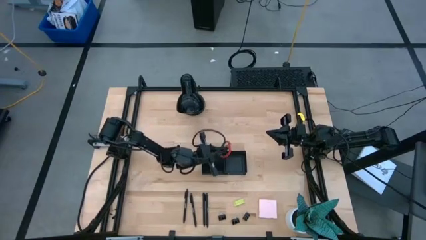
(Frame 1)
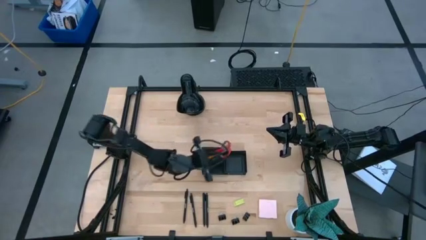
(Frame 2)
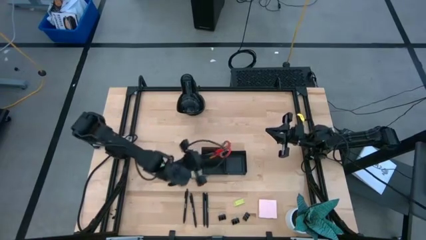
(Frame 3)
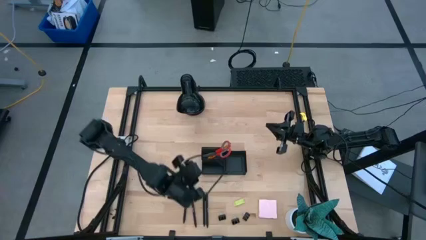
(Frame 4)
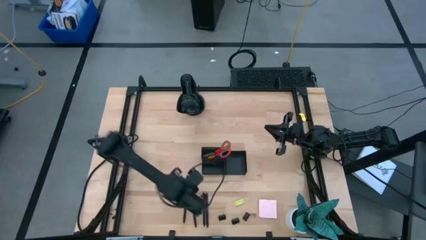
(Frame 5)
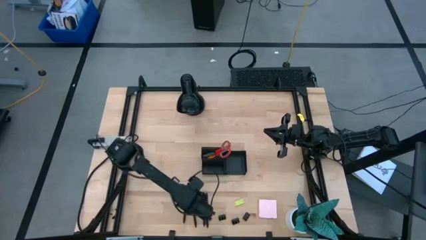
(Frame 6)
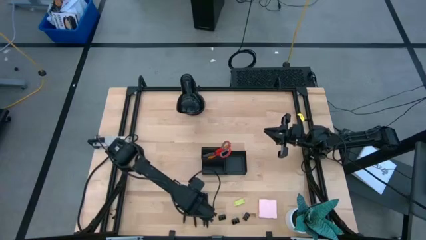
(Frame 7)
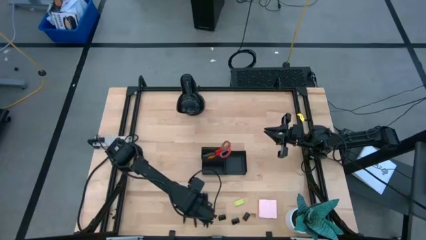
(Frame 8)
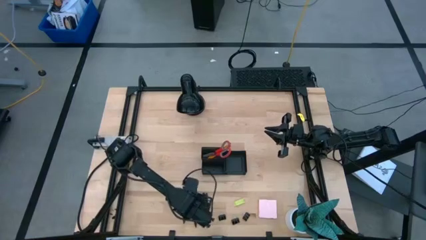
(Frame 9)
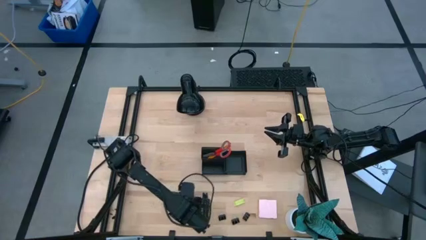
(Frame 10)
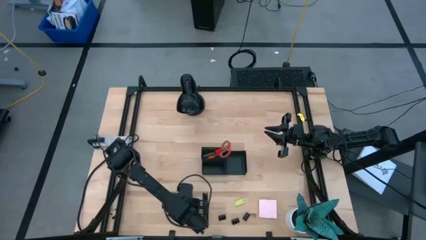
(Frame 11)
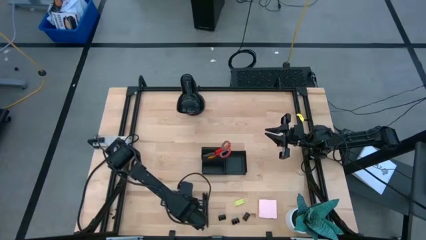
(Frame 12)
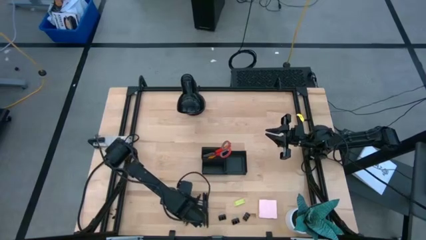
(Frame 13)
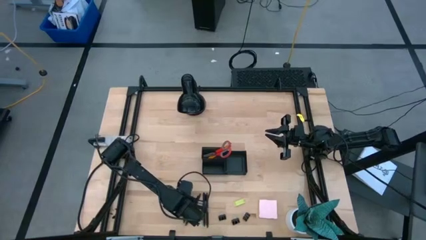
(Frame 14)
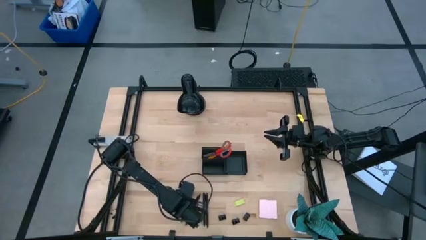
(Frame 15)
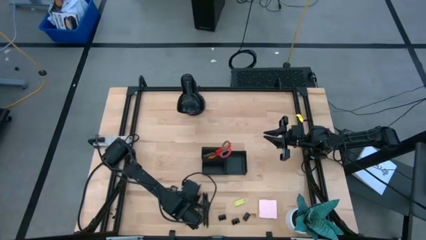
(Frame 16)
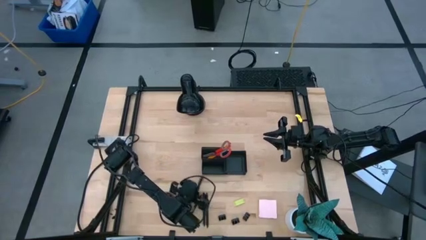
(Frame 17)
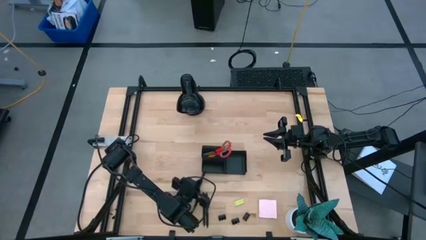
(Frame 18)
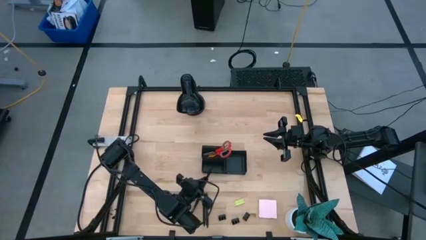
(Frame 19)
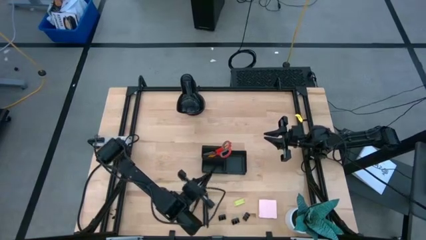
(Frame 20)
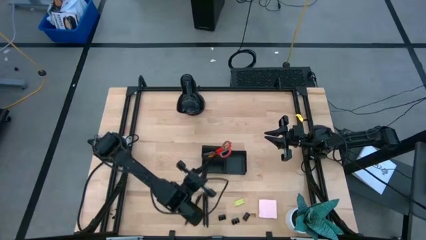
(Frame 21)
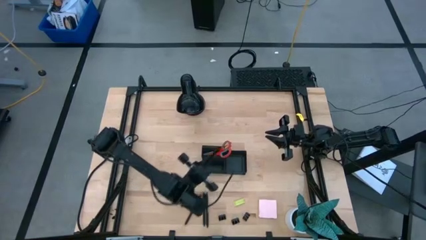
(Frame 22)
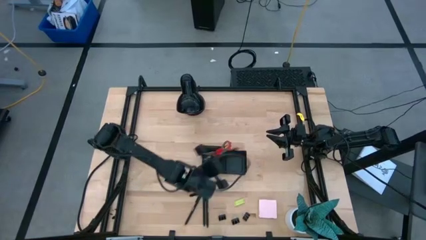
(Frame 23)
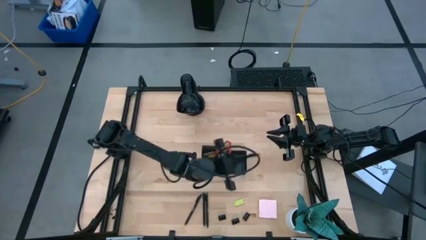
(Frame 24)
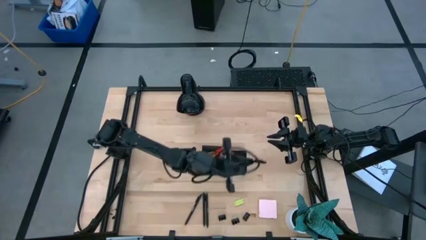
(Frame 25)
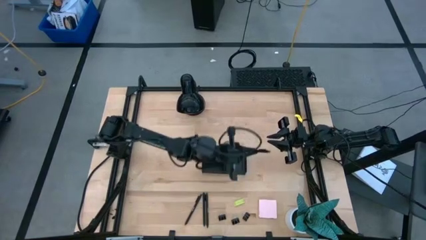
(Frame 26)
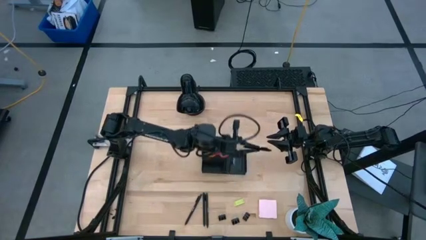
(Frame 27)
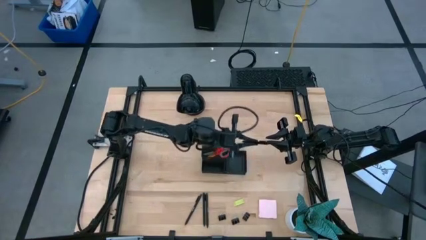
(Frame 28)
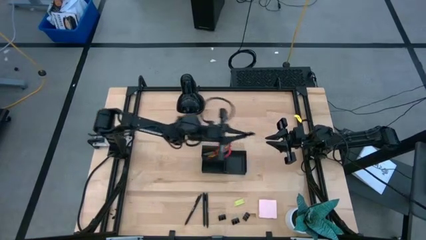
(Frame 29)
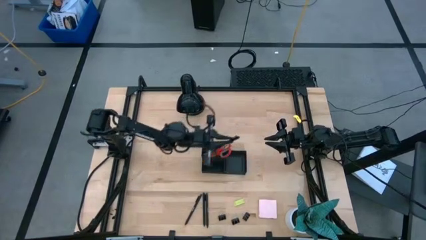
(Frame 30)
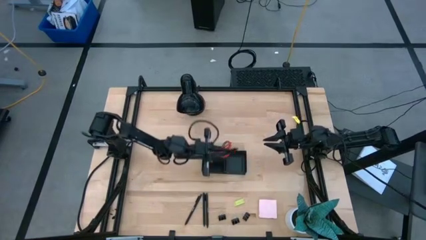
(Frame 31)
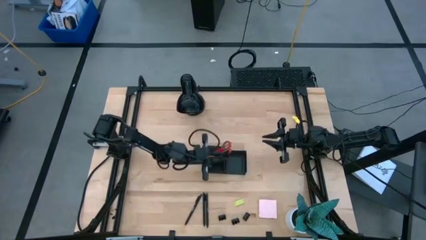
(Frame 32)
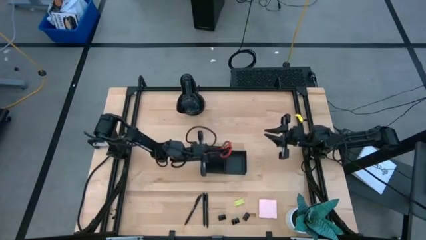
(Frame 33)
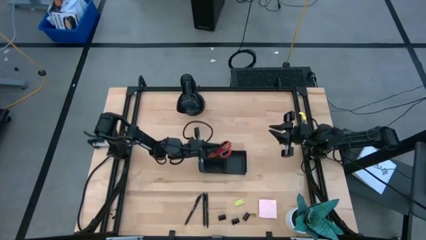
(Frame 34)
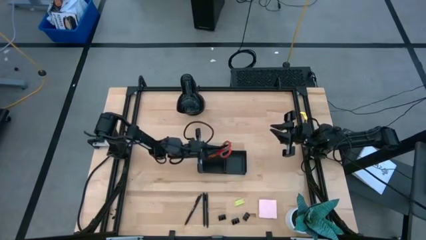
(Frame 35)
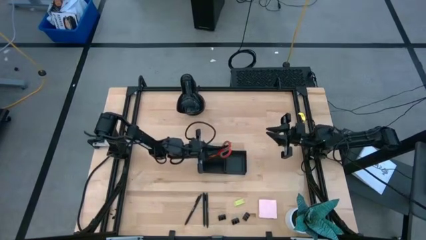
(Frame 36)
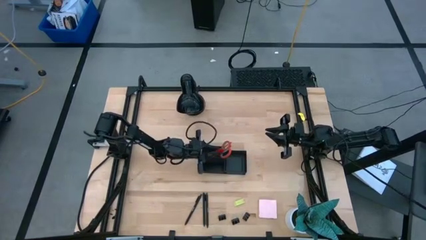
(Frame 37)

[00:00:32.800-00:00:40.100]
Task: Pick and place office supplies into organizer
Put the pen into the desk organizer

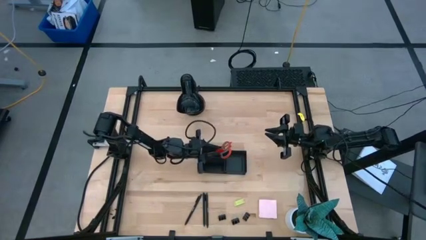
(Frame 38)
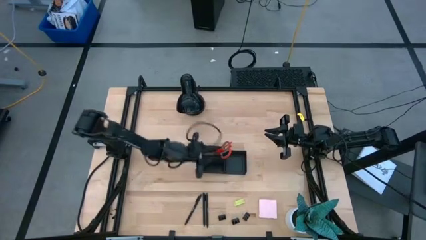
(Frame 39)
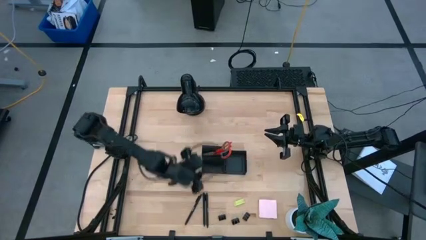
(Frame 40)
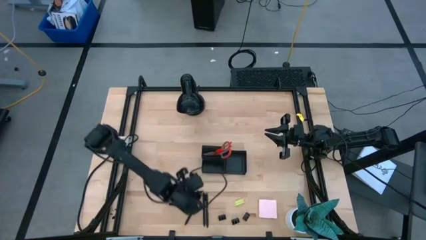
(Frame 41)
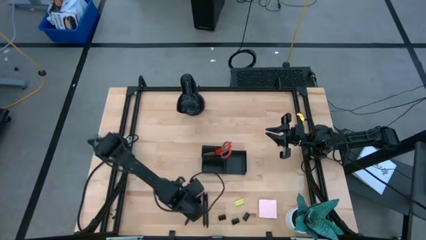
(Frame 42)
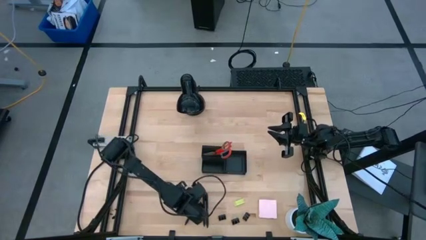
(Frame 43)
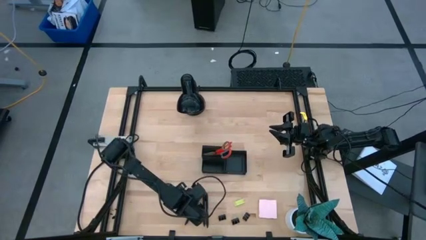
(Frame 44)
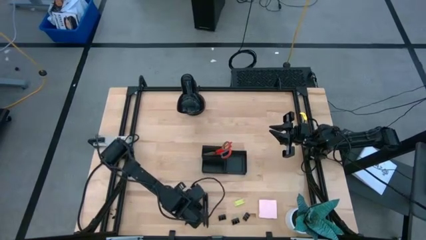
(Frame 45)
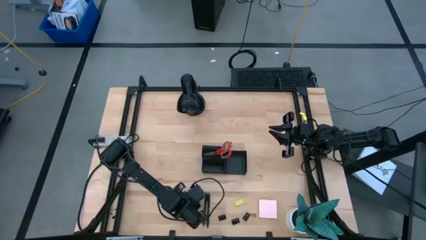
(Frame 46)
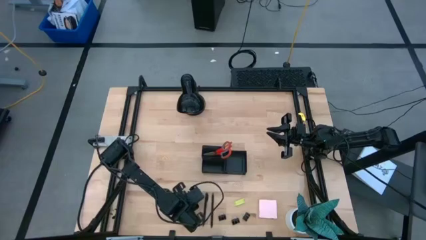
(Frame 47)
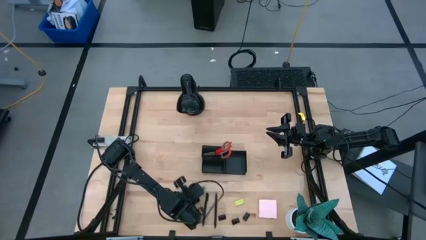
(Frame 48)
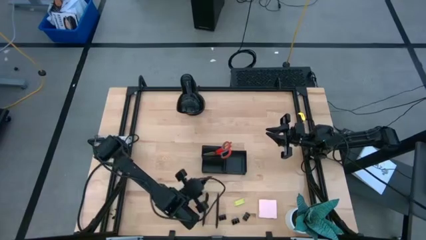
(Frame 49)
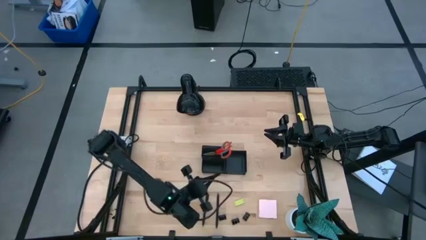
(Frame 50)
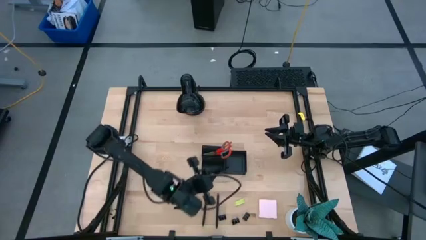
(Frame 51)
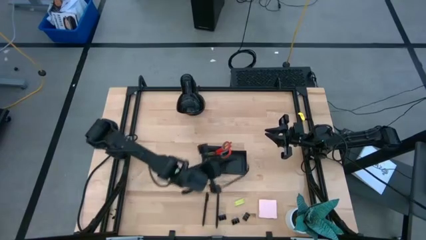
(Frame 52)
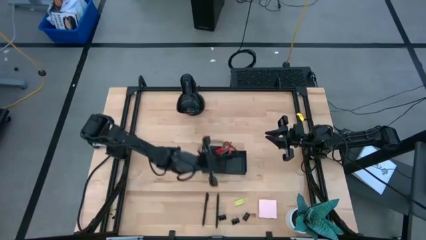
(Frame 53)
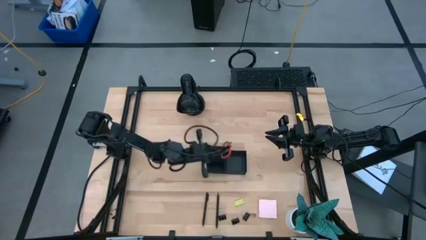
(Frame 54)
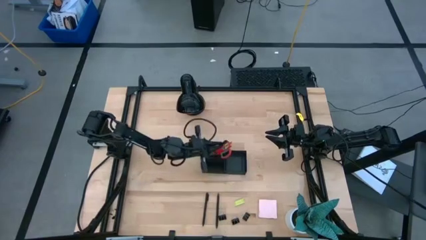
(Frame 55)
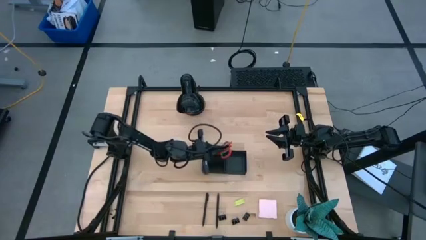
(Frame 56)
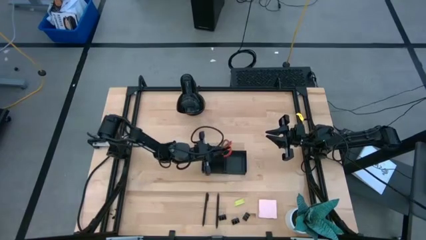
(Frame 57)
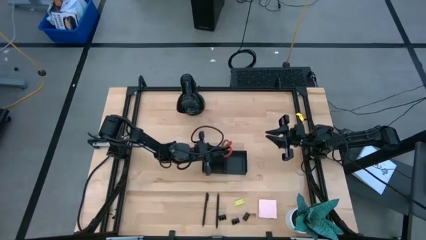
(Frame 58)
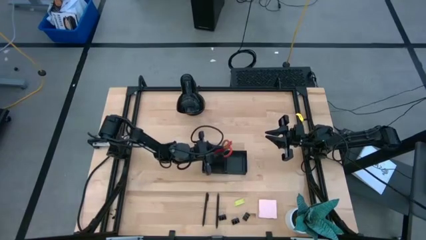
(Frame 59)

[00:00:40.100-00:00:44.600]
Put the left pen into the desk organizer

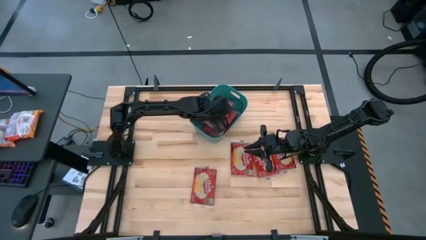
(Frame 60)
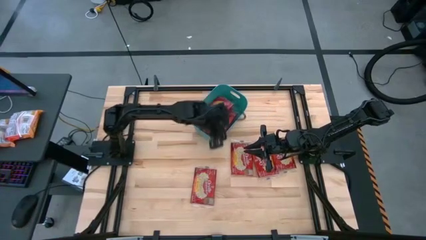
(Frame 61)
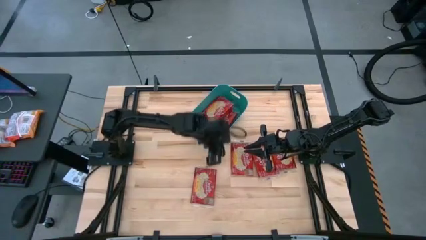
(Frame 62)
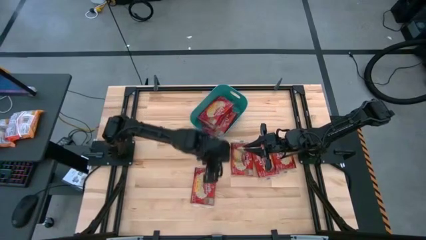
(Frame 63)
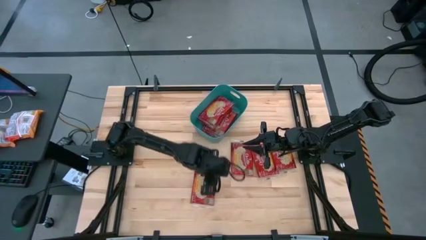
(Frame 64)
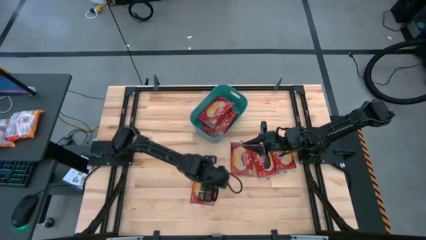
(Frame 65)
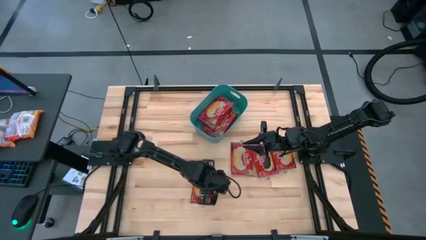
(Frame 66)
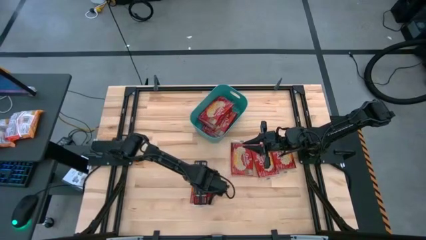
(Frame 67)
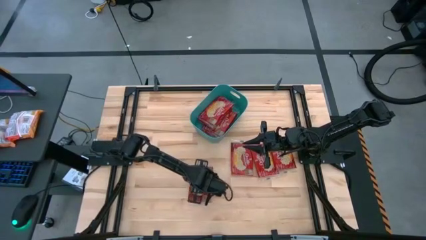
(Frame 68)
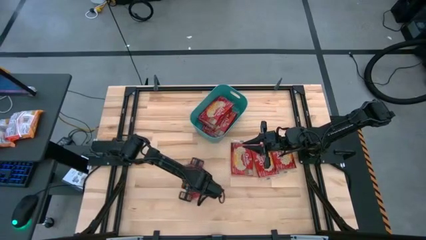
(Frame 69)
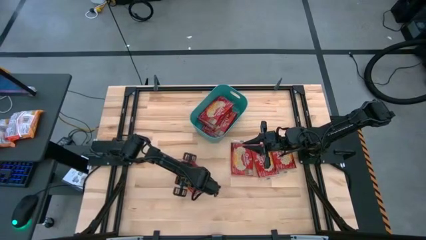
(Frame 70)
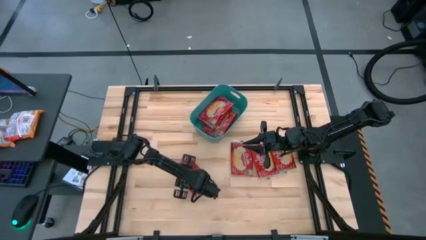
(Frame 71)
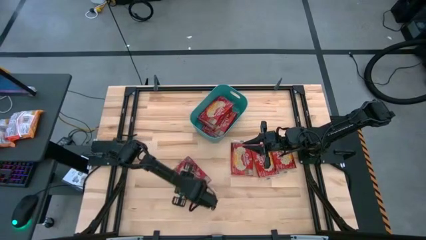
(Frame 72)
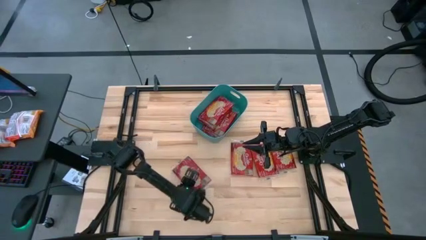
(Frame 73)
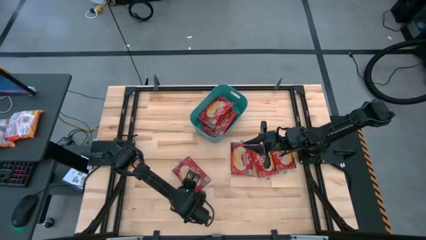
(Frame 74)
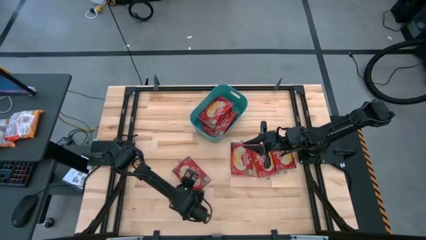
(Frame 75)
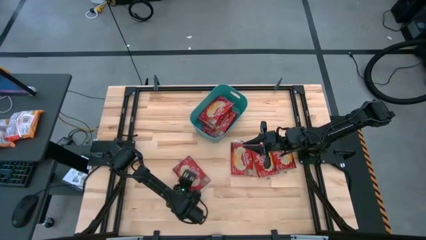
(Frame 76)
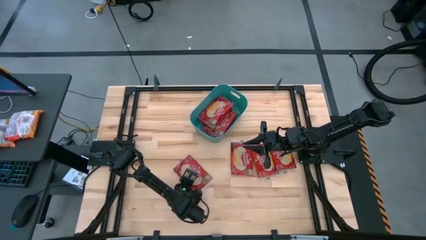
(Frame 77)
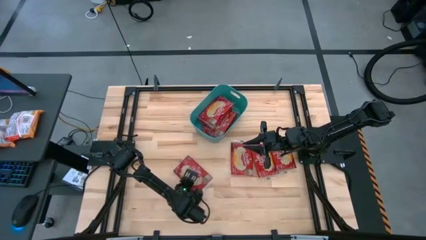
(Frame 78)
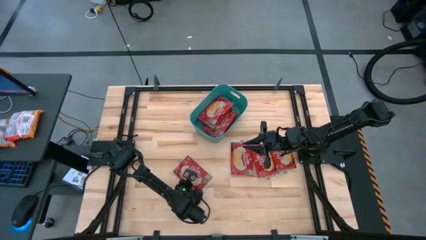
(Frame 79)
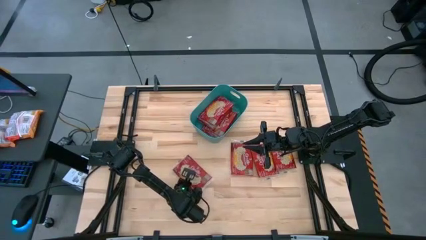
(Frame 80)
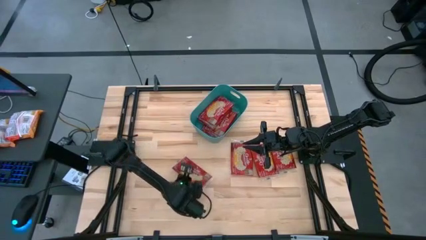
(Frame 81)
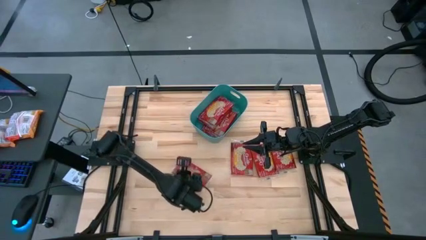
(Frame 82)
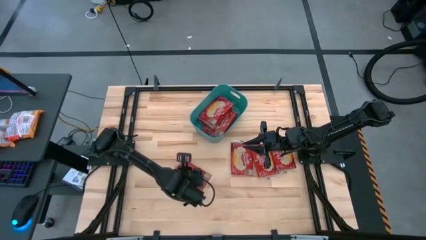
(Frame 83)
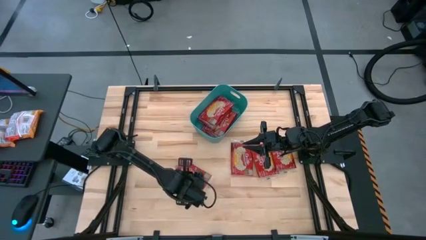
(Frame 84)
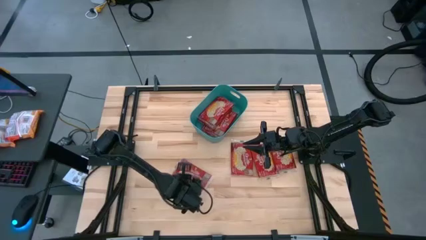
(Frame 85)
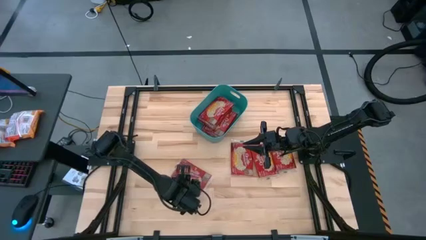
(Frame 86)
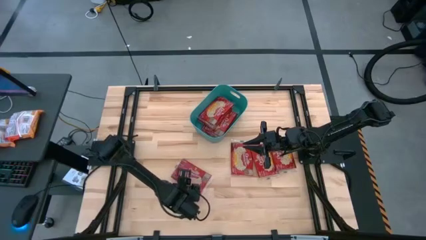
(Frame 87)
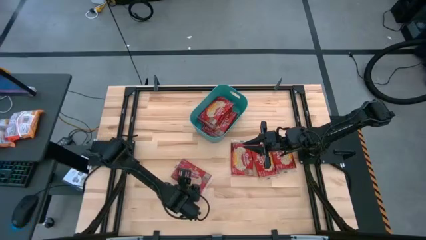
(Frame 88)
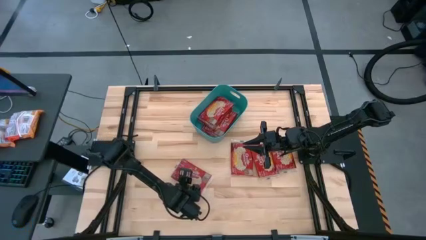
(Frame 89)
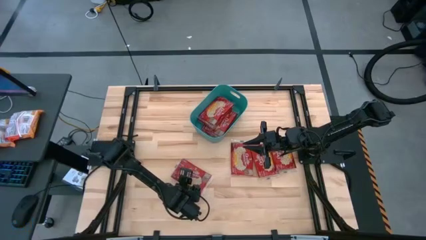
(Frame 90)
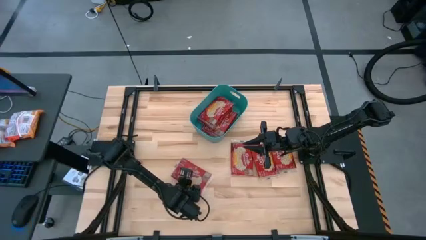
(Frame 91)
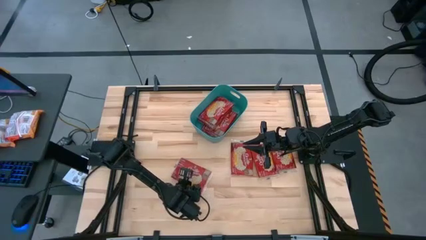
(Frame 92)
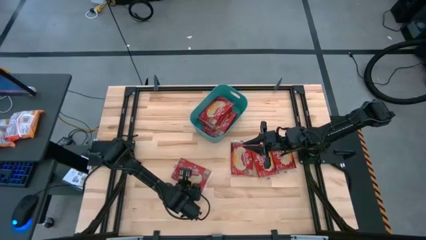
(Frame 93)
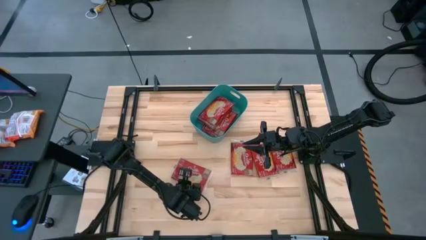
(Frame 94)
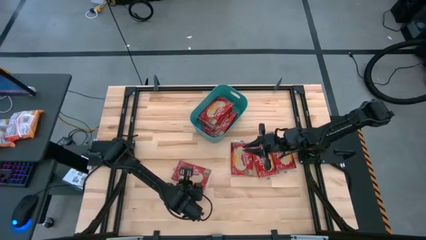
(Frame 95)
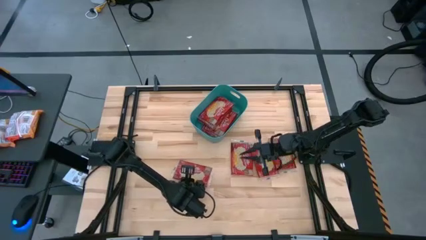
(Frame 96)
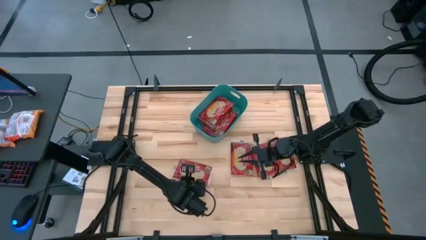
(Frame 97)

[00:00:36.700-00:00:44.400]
Task: Sort popcorn bags into baskets
Put the popcorn pack into the blue bin
